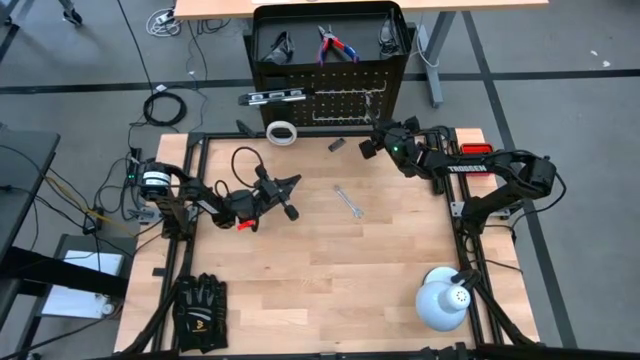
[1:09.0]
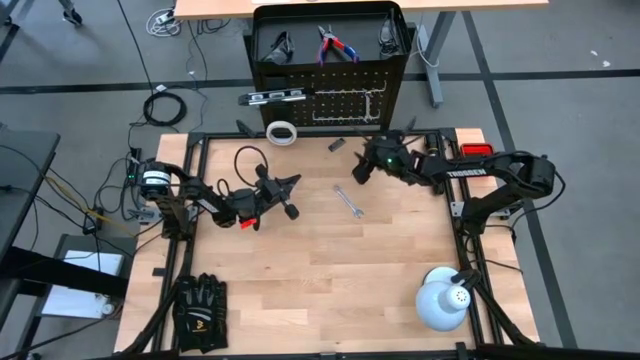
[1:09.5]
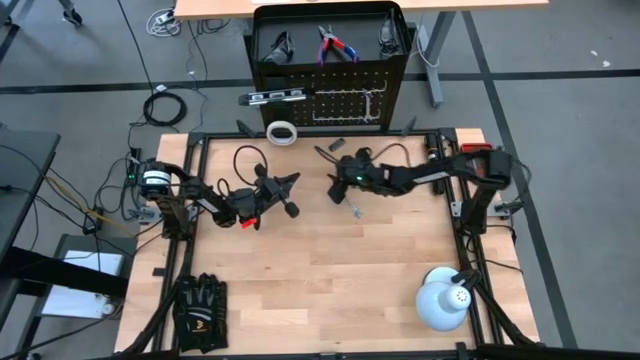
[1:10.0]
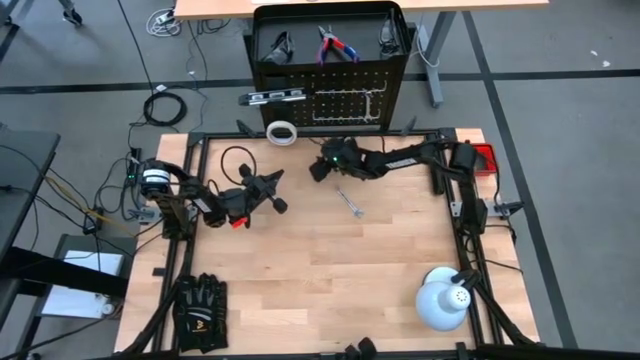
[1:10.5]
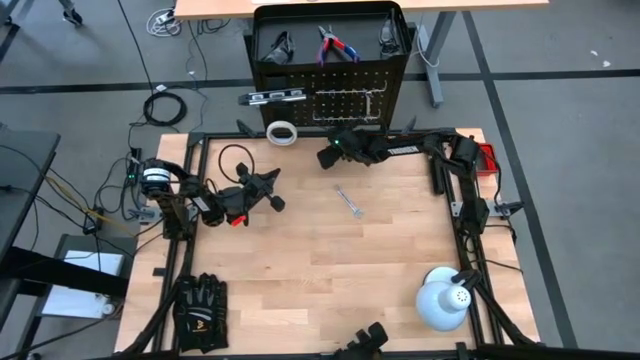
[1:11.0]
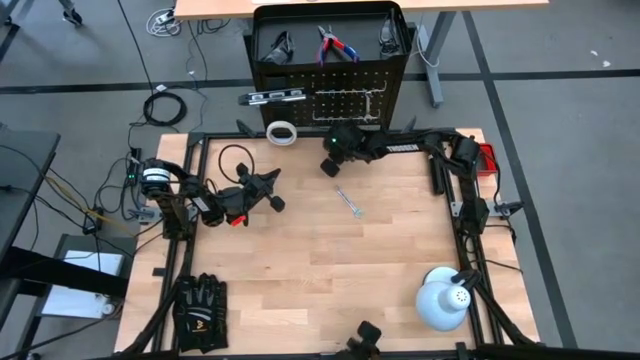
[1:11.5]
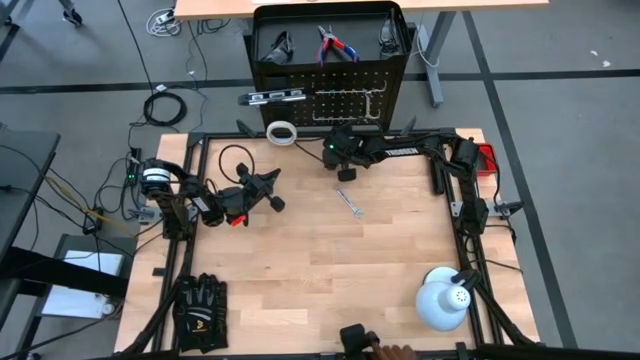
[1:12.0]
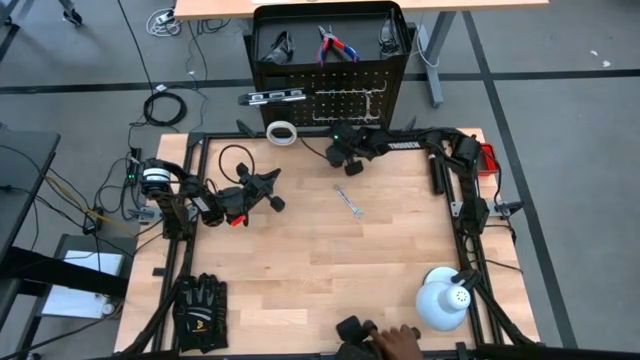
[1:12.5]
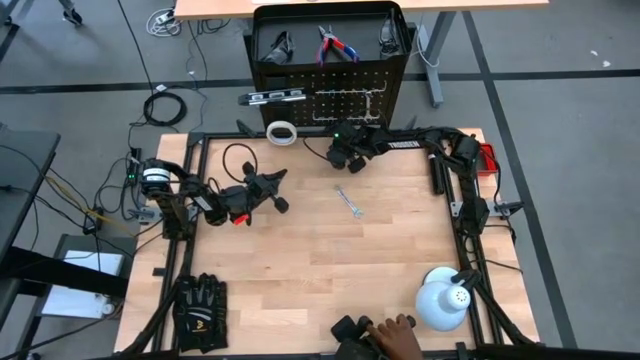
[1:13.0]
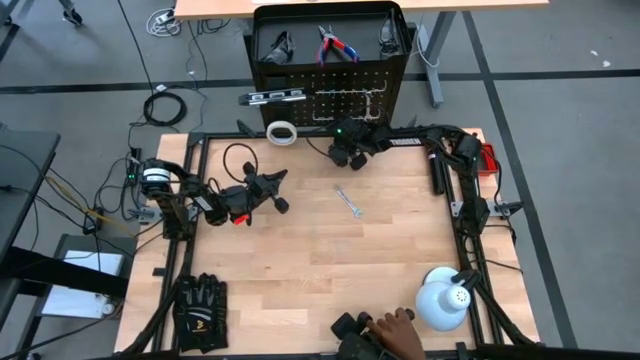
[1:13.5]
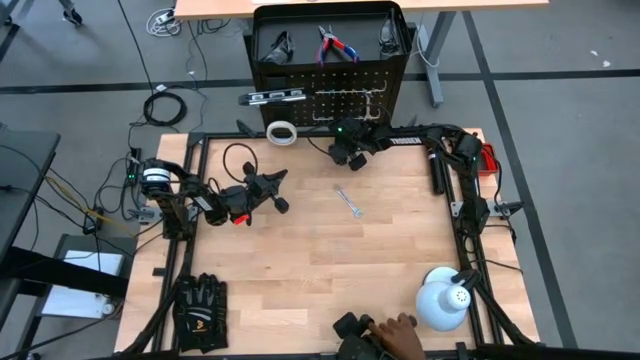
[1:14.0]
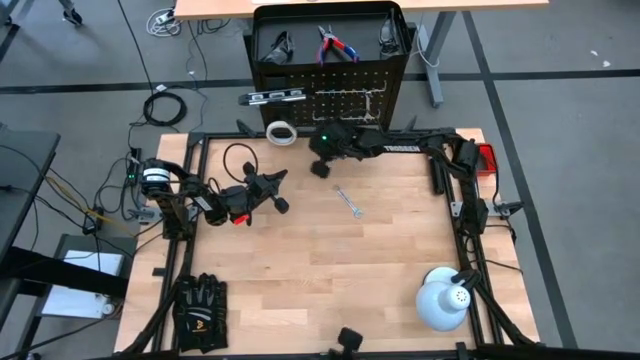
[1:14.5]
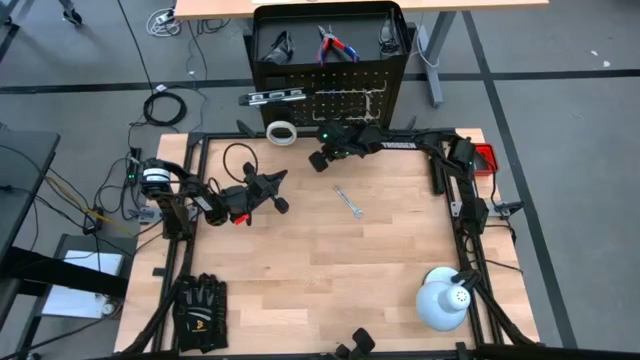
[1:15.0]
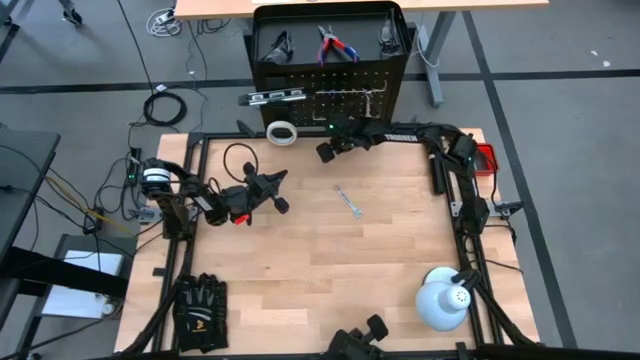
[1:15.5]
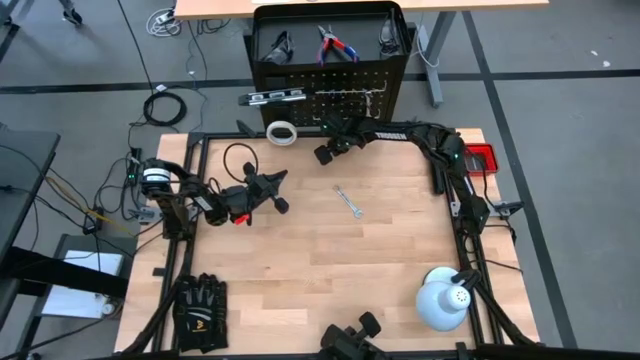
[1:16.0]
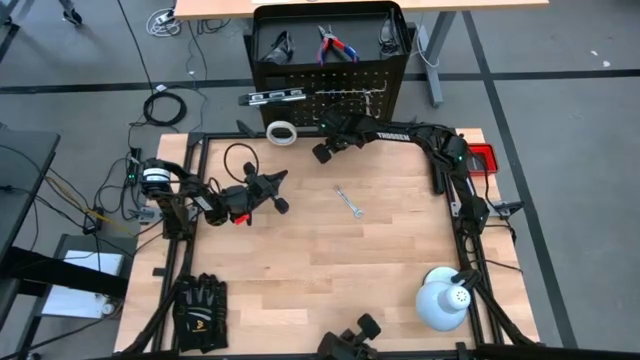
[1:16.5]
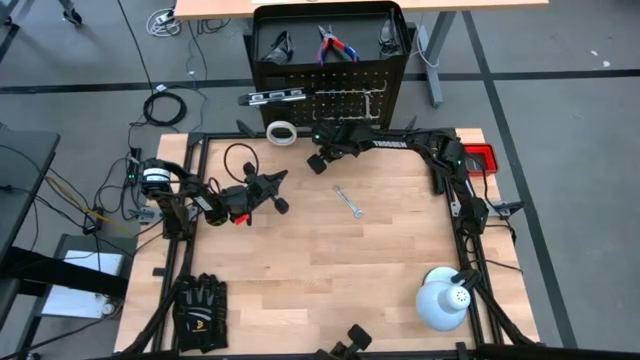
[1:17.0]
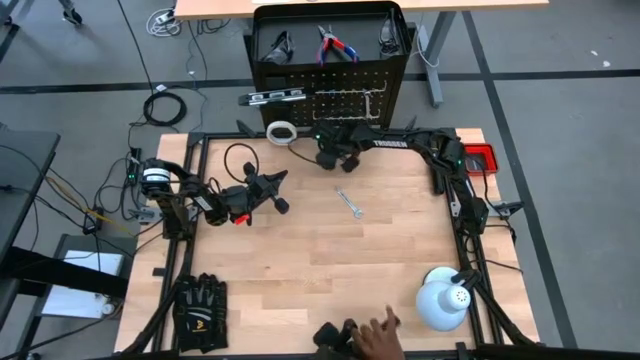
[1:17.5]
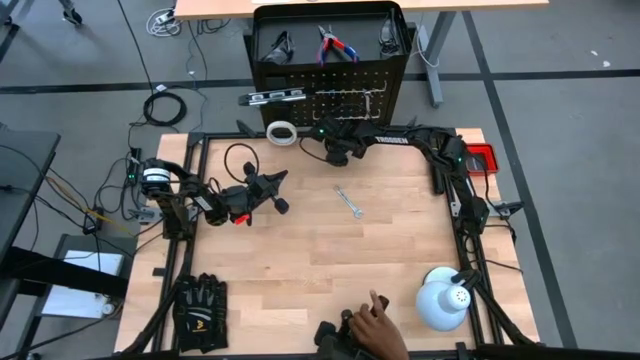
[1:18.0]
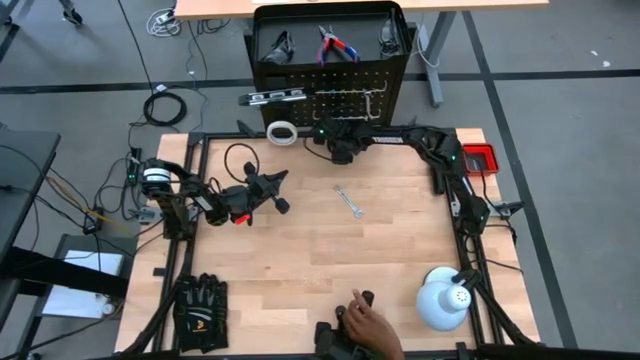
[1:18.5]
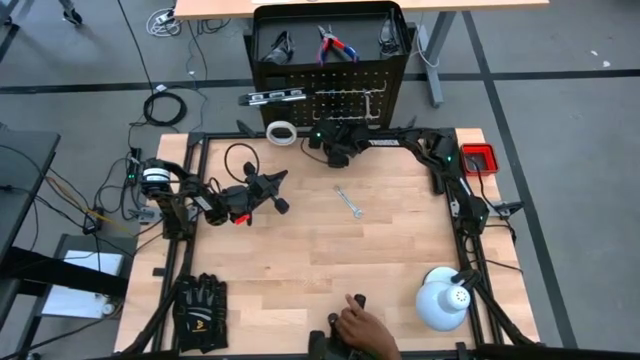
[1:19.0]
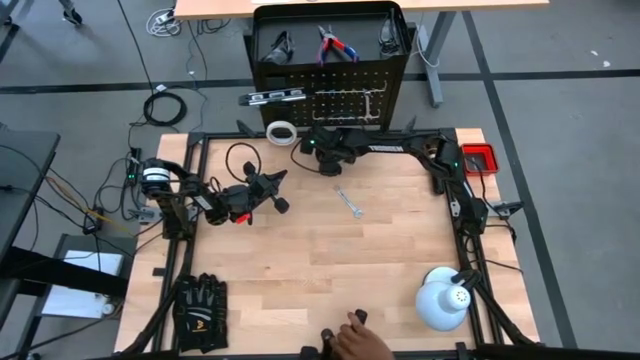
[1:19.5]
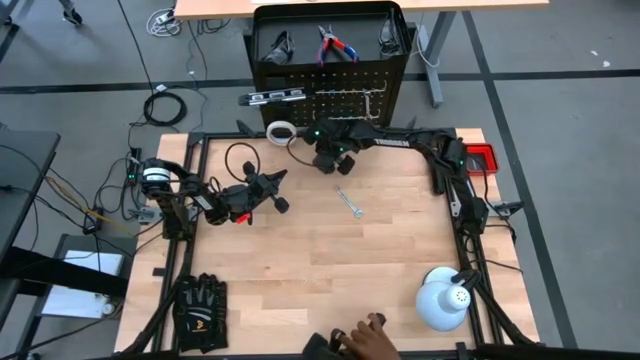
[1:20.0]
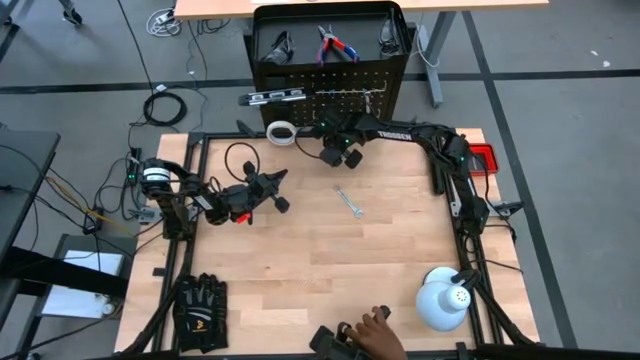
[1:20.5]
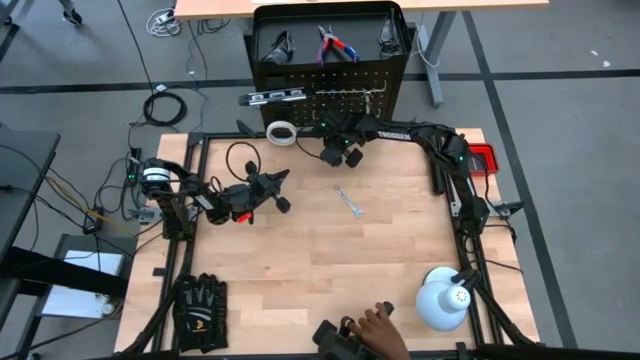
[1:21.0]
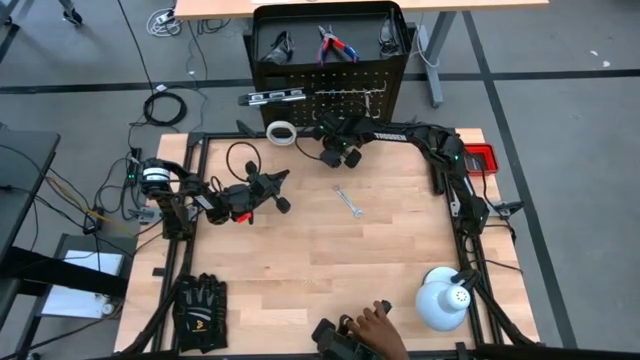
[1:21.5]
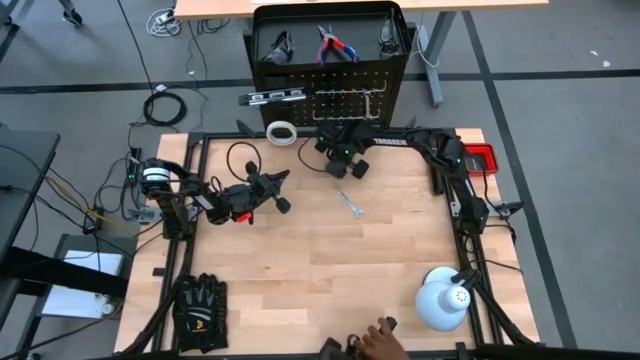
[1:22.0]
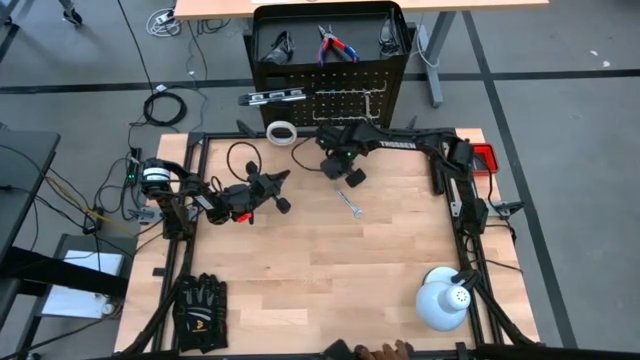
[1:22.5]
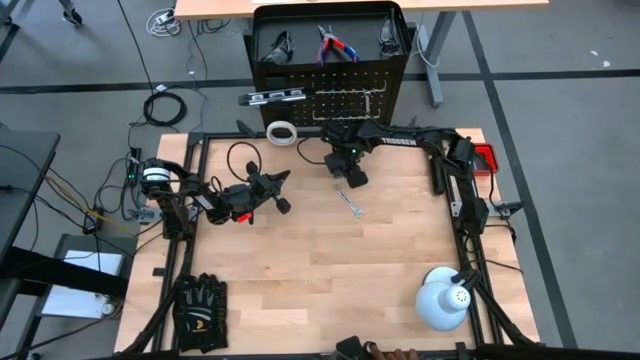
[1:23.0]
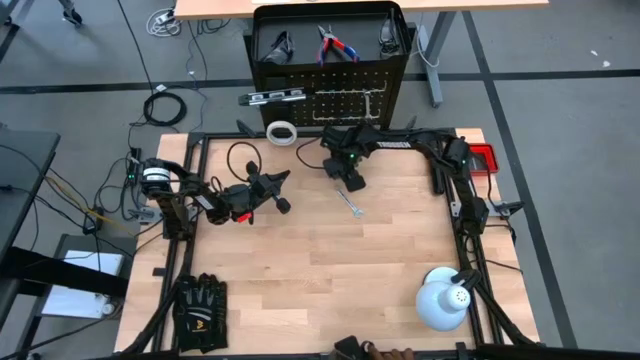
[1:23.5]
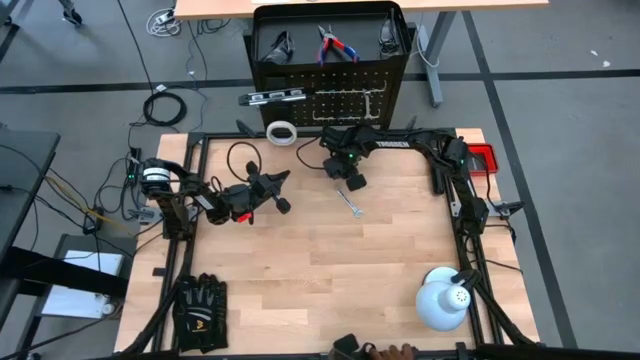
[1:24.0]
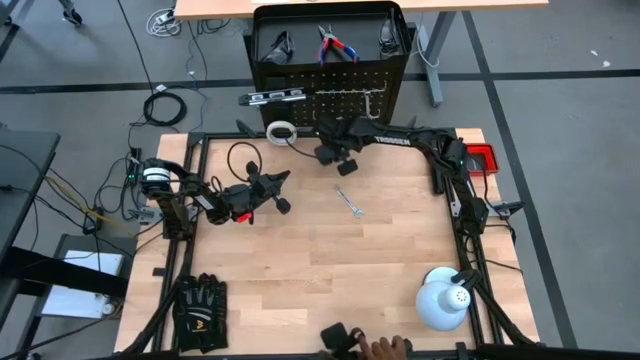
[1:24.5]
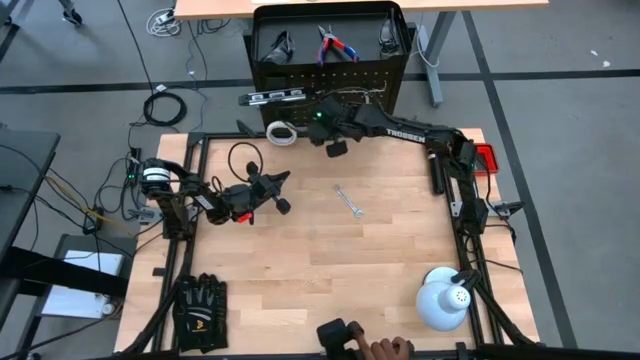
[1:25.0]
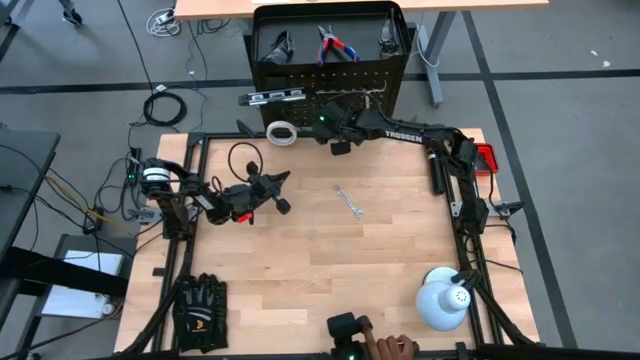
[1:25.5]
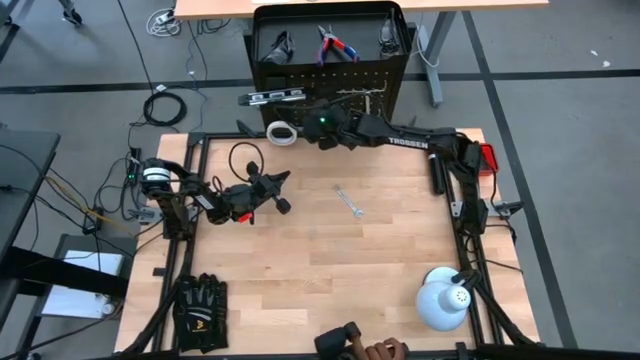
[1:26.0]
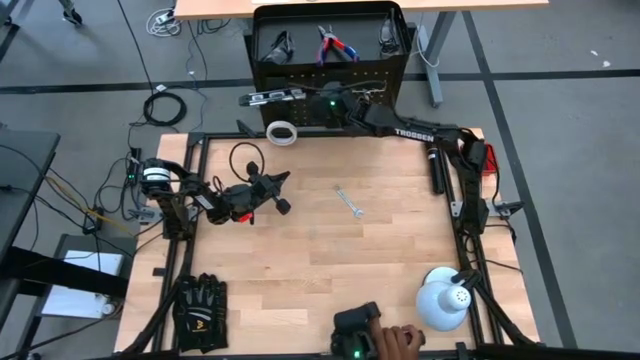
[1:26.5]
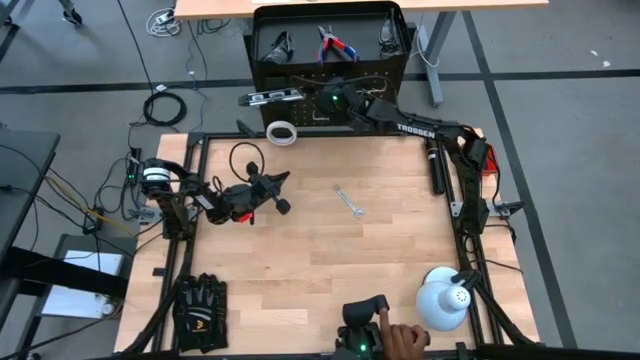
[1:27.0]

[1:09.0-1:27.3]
Task: Hang tools onto peg board
Hang the utility knife blades on the peg board

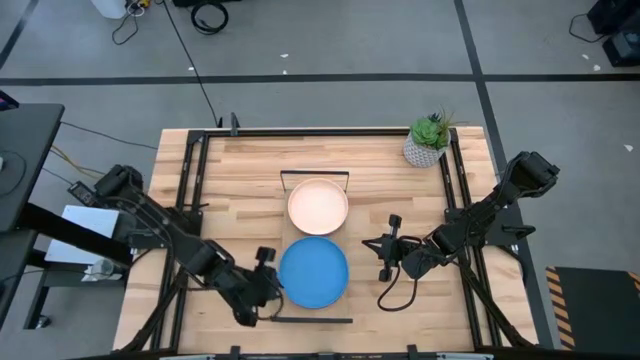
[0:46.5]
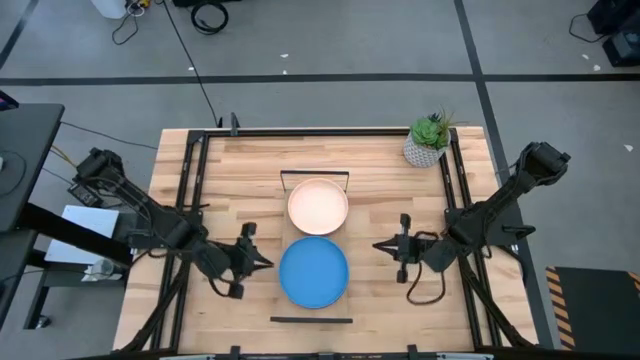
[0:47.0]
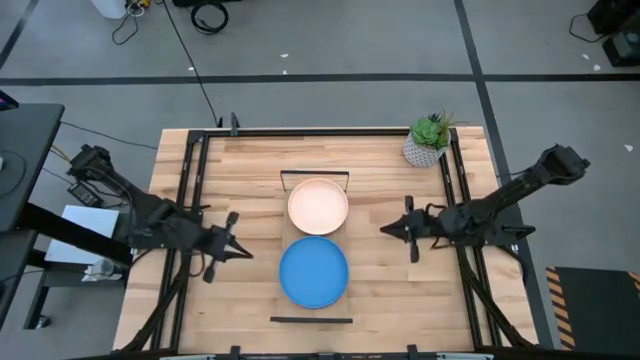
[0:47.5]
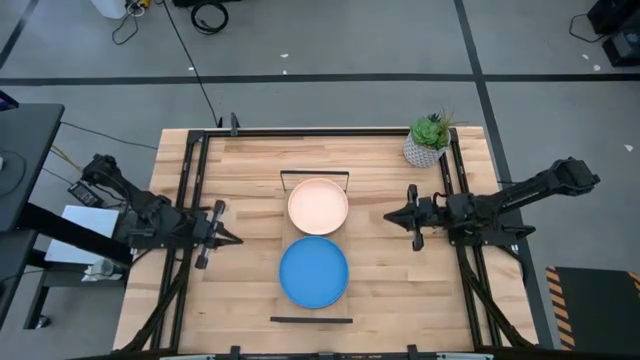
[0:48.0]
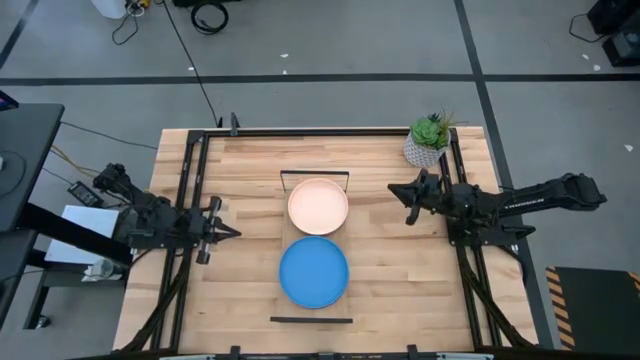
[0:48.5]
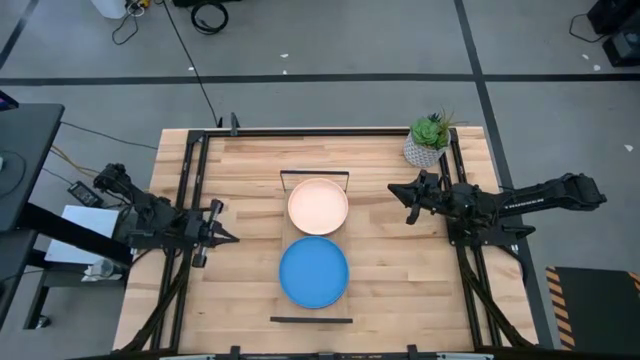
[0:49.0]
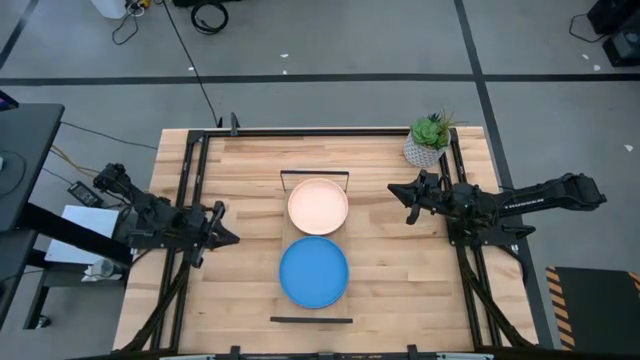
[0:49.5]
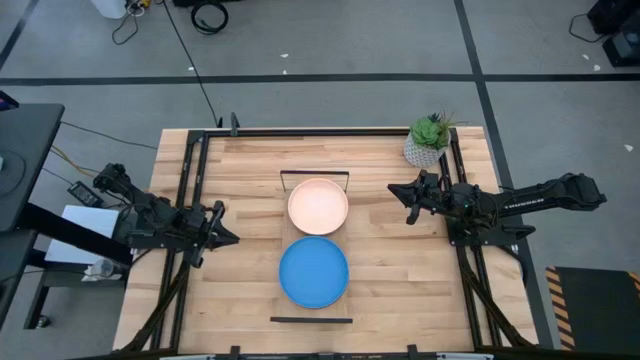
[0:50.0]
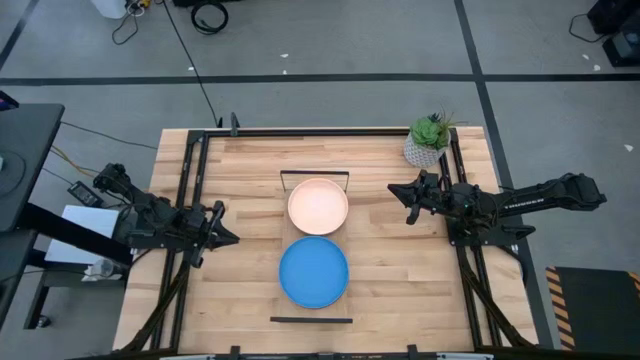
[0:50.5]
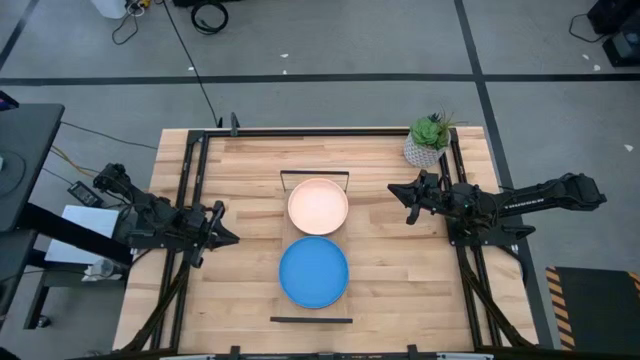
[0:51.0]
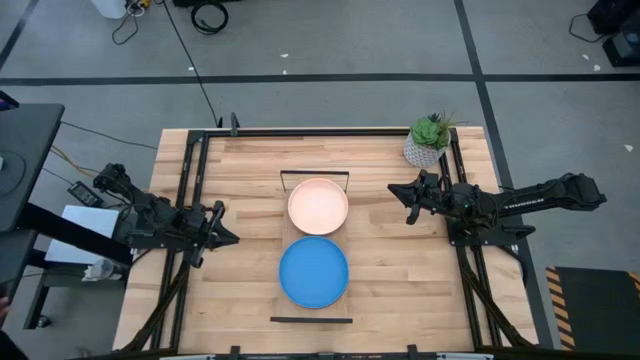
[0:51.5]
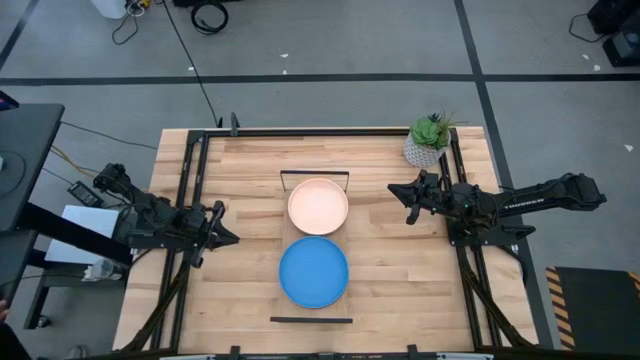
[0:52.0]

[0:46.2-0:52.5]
Task: Place and stack plates onto a shelf
Return to Home Position
